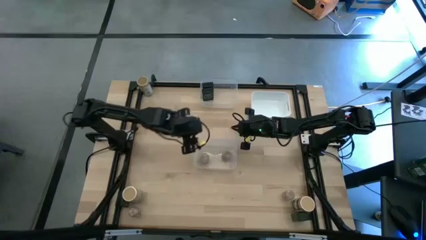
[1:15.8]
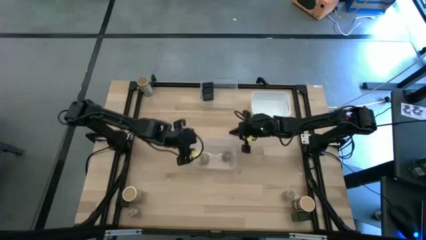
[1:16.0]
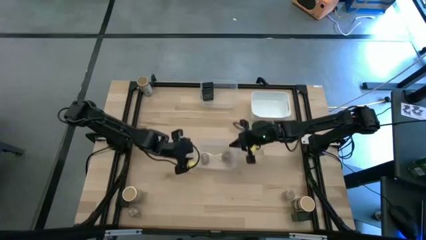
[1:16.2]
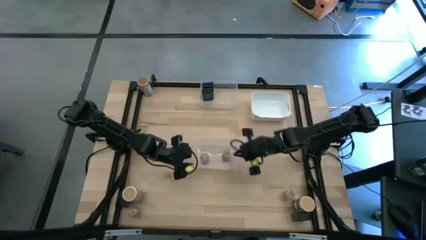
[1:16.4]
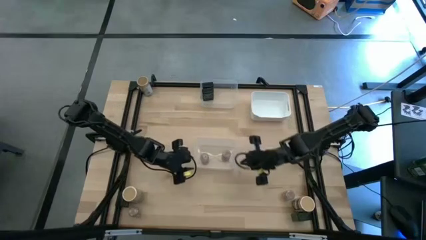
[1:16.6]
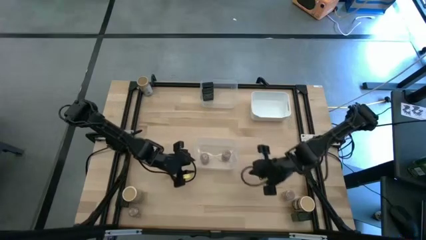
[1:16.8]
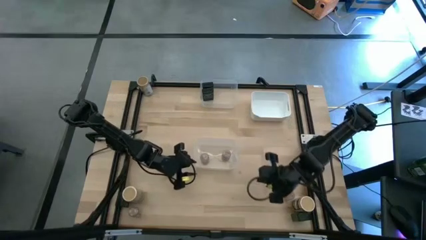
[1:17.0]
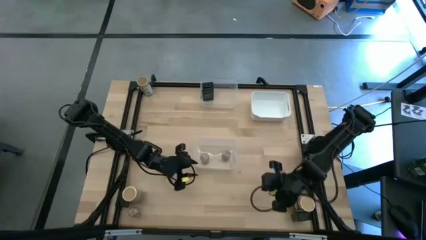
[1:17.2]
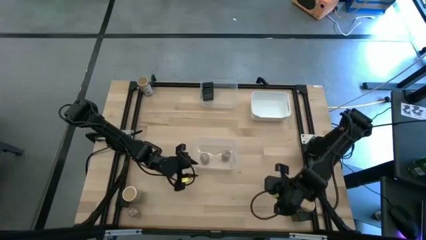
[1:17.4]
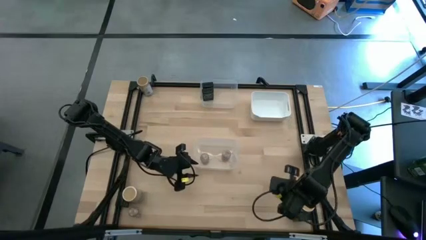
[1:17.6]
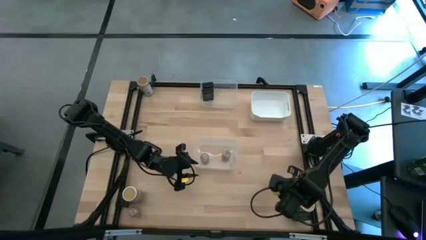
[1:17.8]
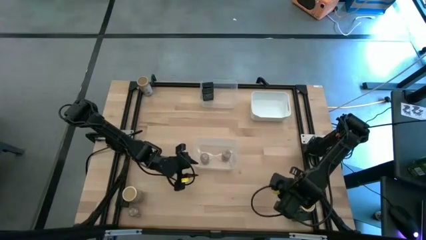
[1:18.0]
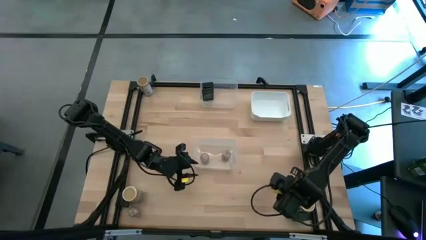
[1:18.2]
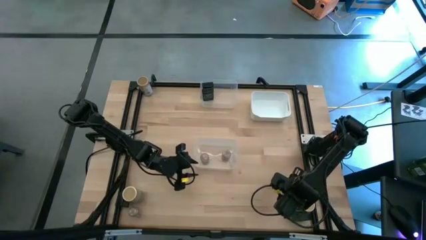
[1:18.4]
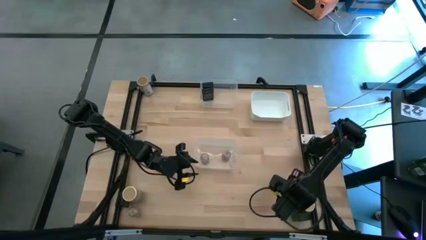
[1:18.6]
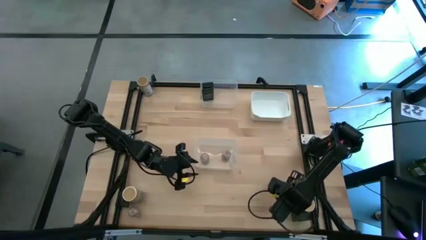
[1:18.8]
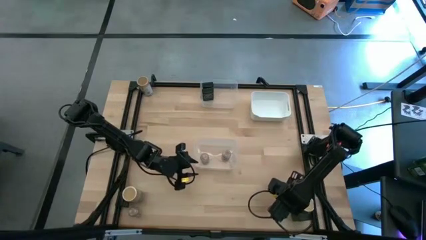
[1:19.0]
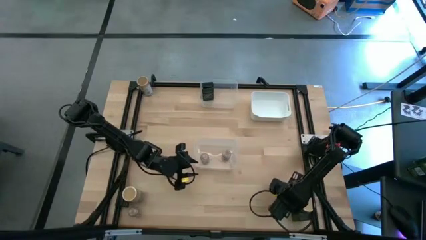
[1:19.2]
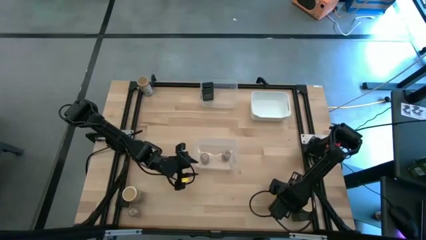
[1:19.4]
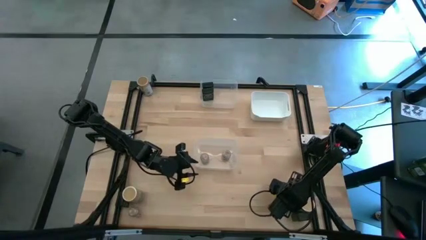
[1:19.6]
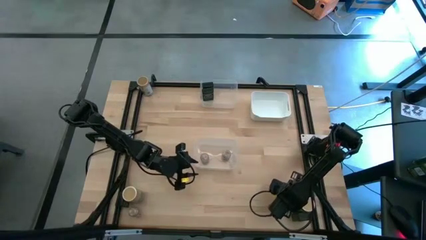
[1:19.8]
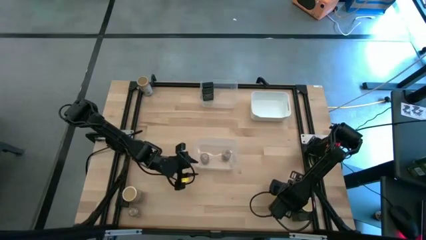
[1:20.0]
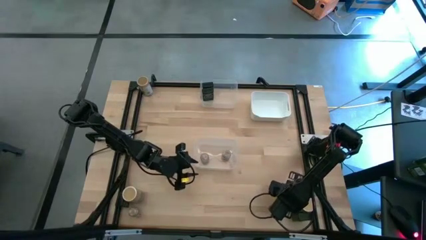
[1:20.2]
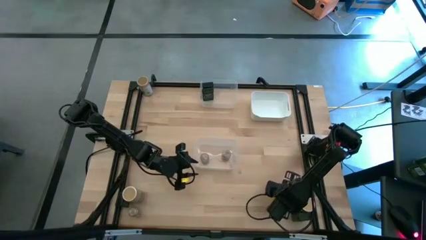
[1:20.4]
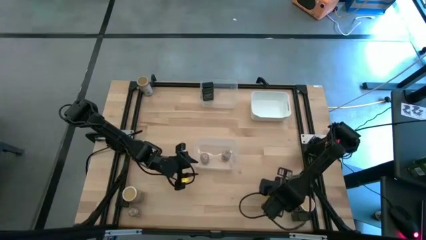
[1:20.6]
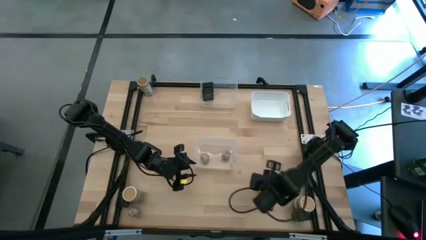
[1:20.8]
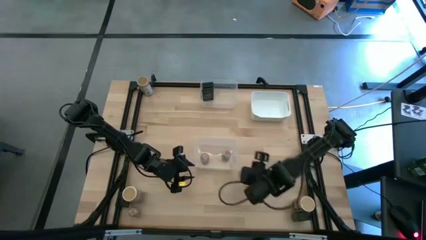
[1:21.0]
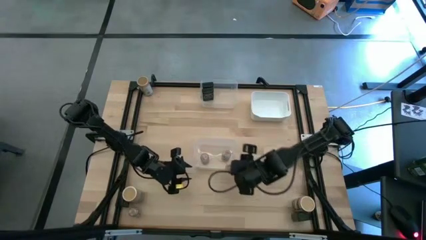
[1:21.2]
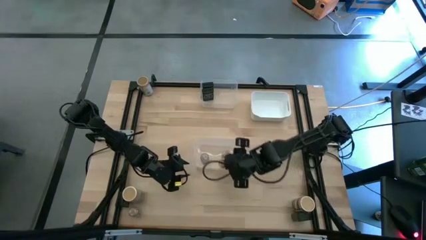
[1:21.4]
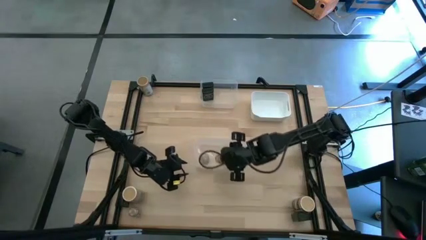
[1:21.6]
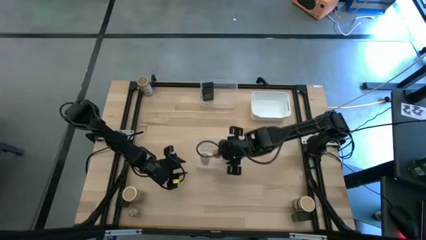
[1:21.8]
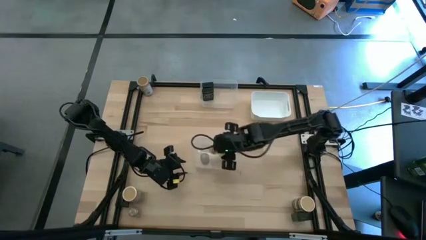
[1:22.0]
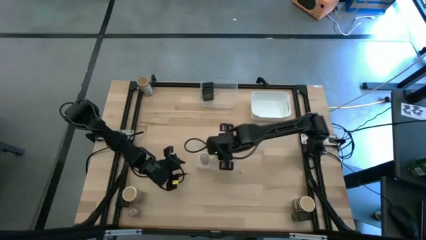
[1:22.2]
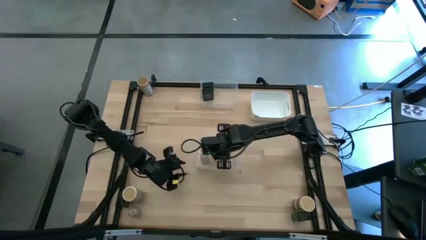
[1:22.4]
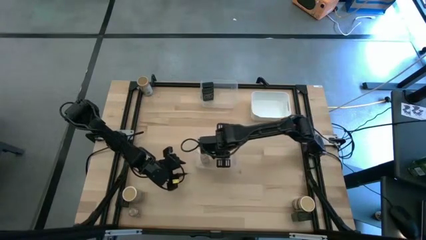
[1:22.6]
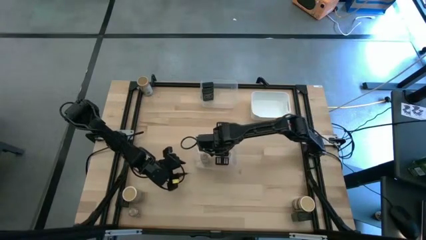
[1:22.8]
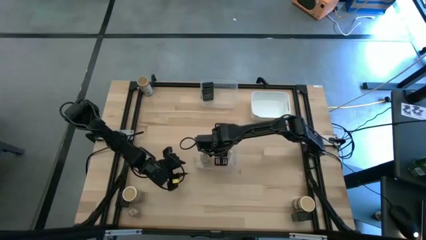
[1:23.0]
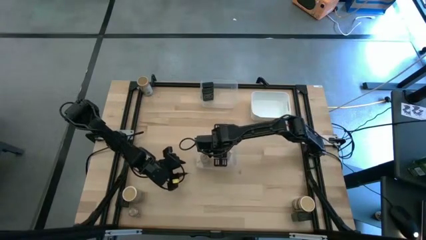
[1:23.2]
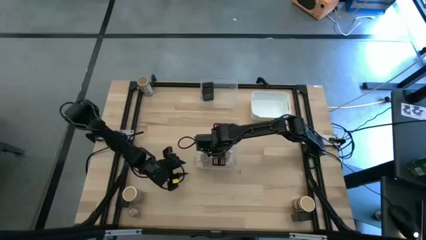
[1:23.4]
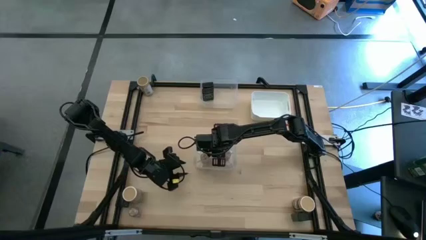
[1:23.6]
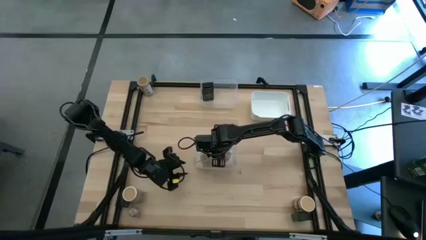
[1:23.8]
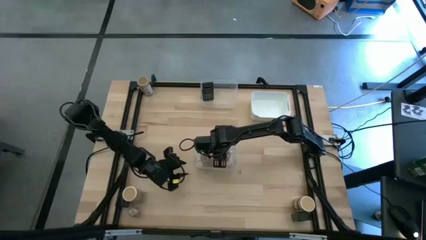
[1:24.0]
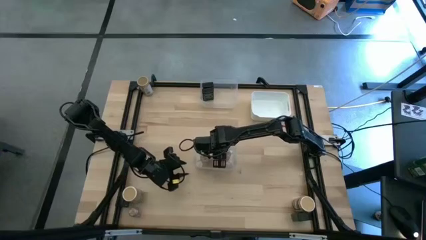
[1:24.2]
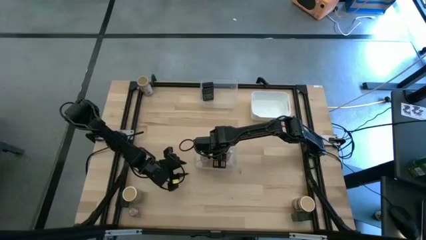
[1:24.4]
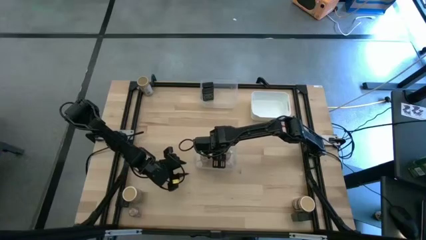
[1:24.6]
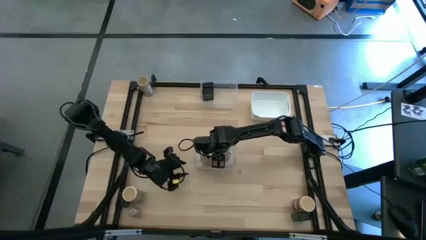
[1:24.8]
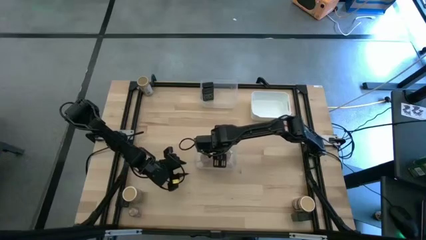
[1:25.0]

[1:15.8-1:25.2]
Task: Sort spices by type
Put the right transparent seasoning bottle into the bottom transparent bin

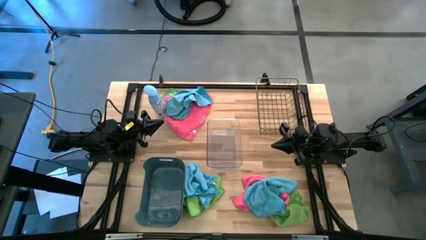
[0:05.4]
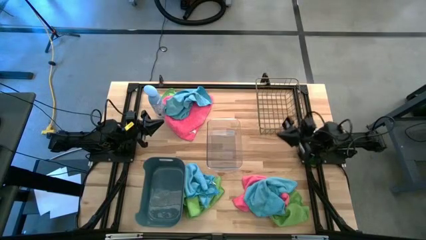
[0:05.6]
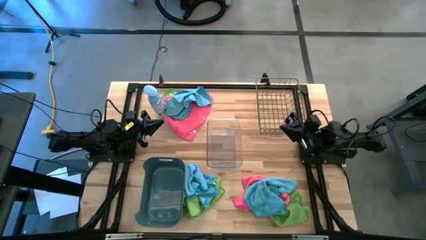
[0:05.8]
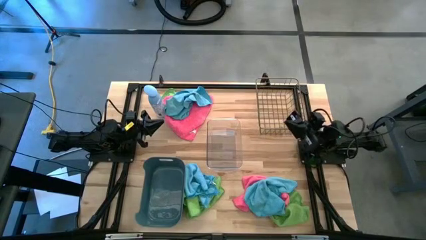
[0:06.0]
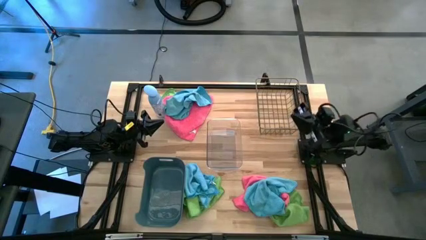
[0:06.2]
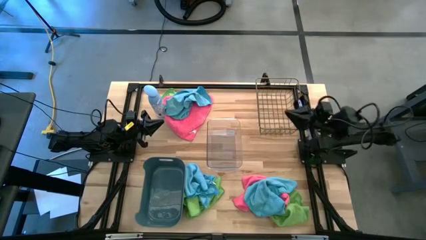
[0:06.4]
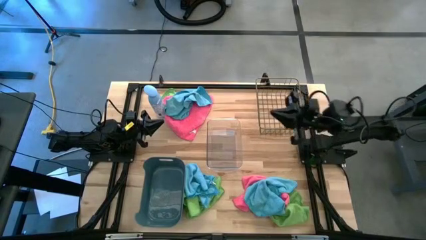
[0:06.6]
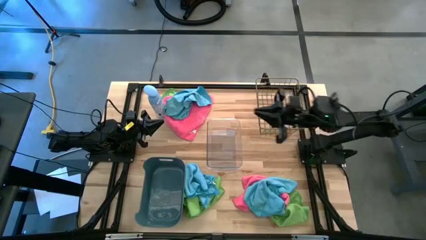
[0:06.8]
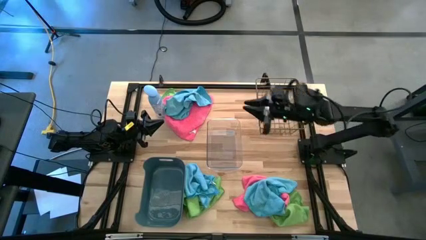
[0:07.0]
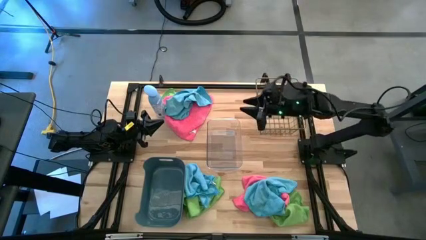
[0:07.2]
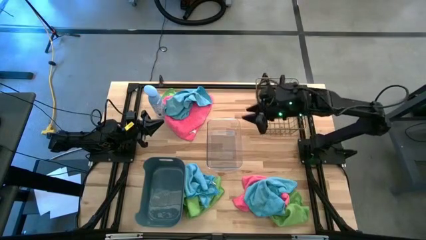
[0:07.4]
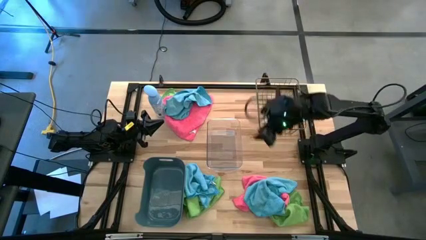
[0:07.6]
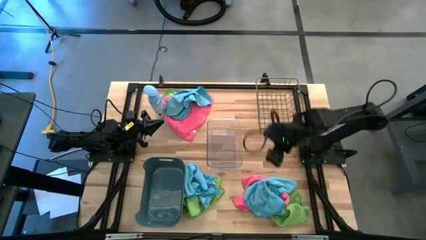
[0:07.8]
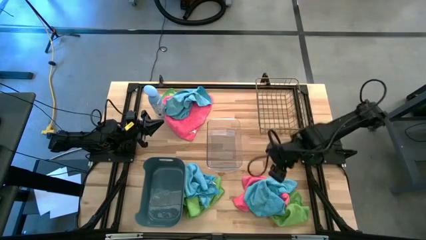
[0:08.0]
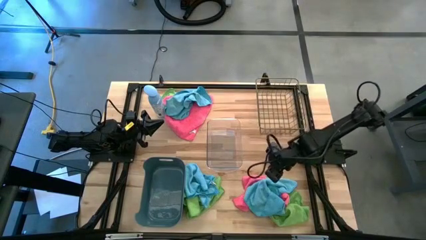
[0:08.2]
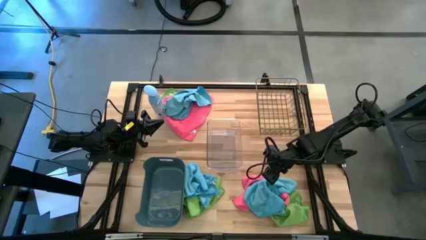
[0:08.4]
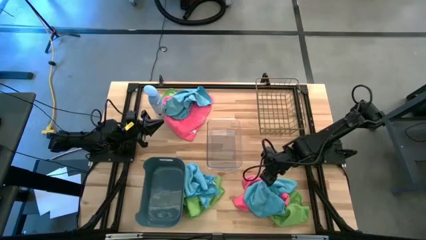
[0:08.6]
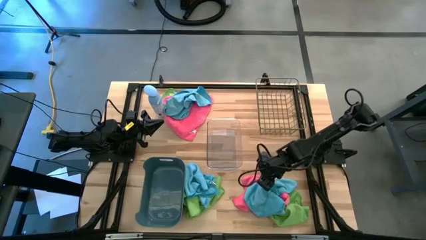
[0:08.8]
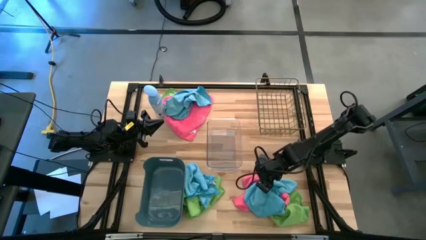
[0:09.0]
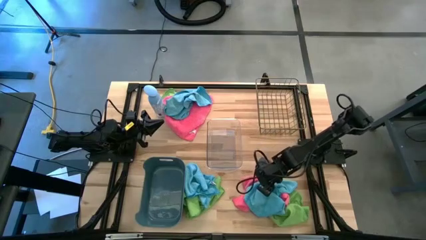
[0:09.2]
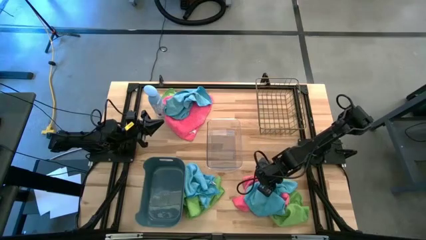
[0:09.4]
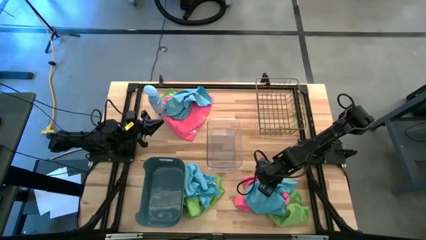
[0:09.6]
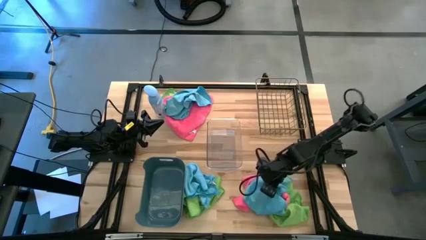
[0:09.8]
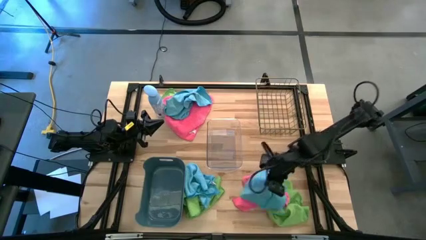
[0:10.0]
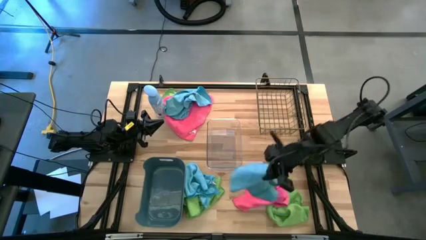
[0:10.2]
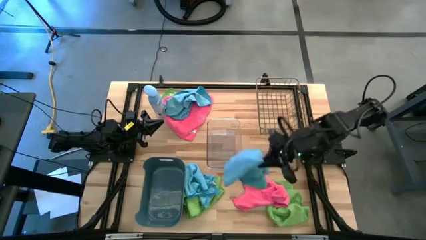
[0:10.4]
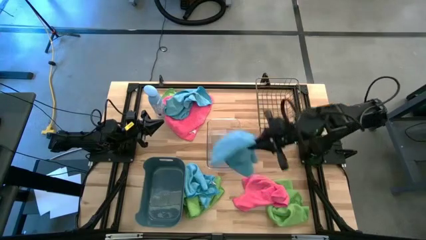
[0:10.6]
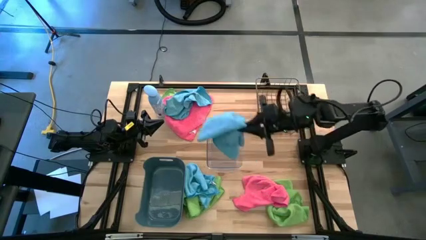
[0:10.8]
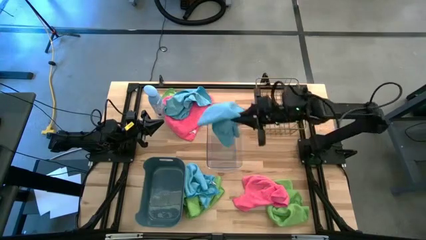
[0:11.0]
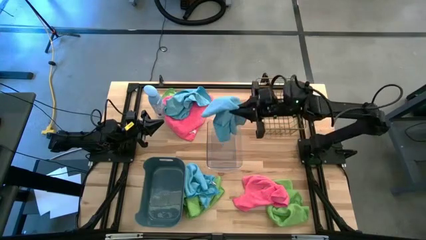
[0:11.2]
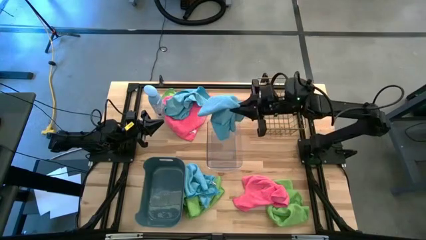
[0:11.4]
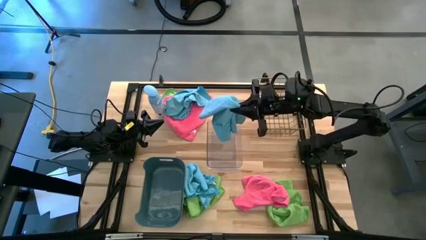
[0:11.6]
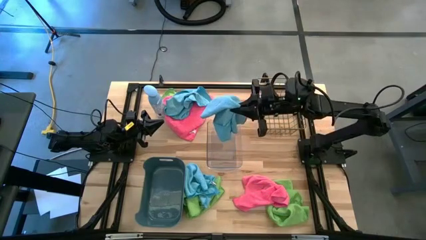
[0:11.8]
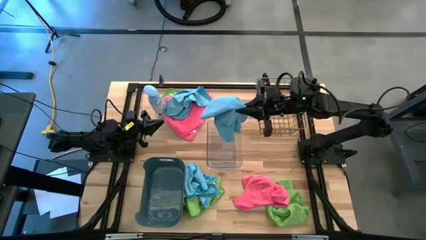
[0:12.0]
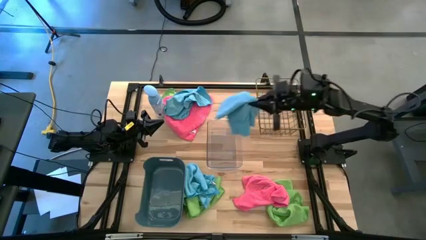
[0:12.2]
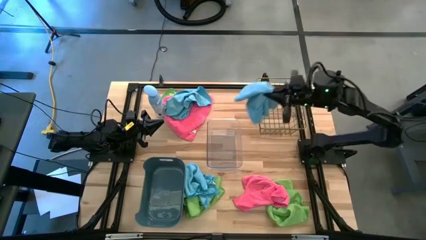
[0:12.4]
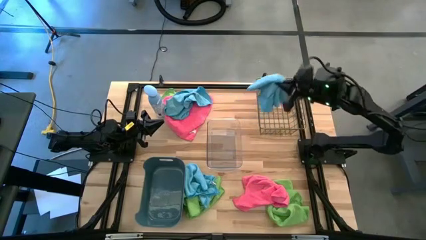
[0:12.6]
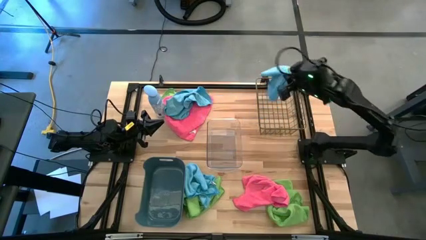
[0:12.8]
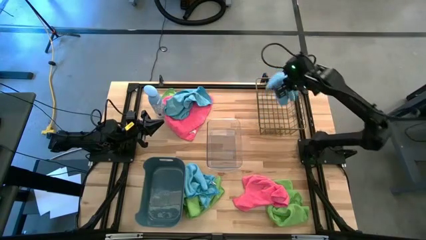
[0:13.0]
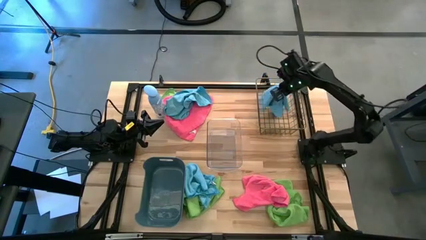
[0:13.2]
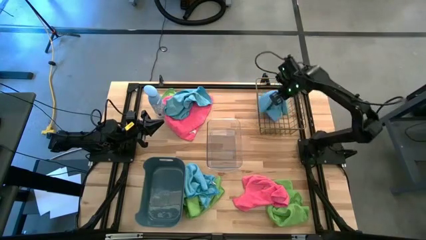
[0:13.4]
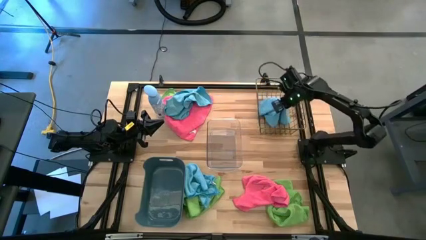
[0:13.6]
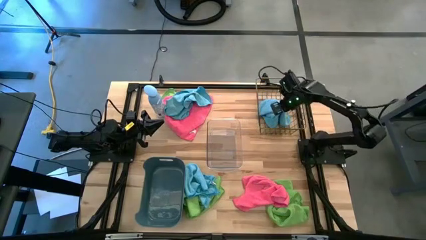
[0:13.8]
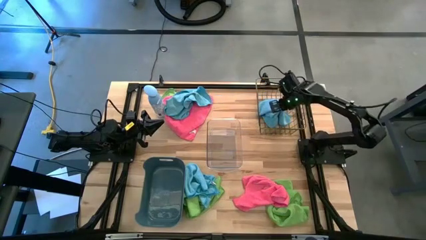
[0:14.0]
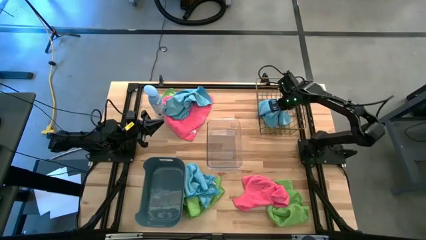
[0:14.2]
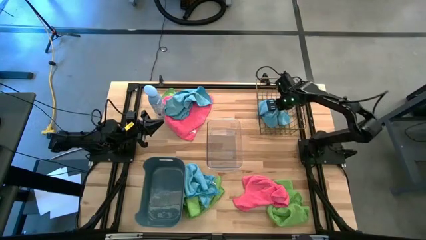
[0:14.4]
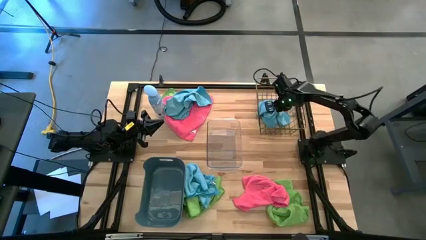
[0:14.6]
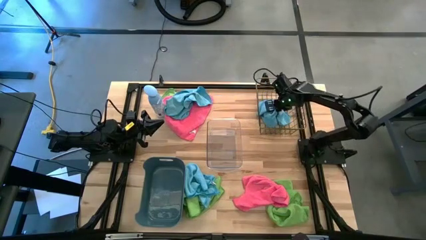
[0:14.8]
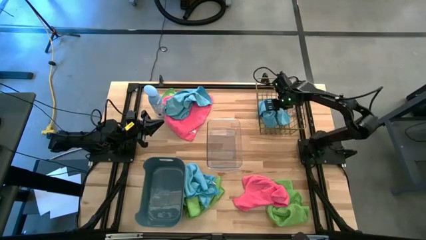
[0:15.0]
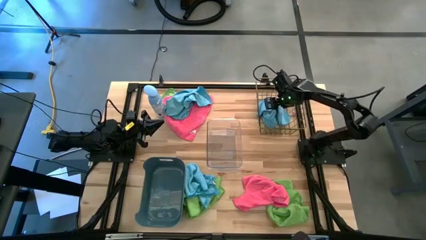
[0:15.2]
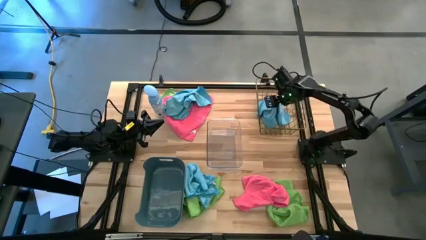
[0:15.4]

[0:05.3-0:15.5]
Task: Sort microfiber towel by color & place in baskets
Put the bottom right blue microfiber cloth into the wire basket
